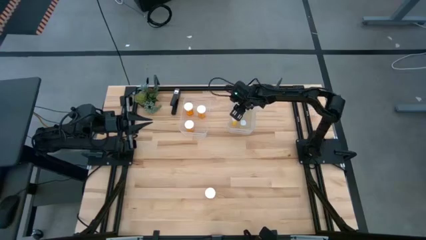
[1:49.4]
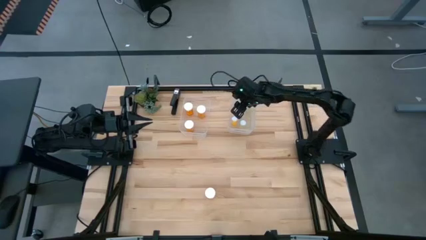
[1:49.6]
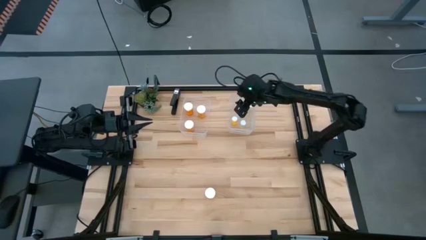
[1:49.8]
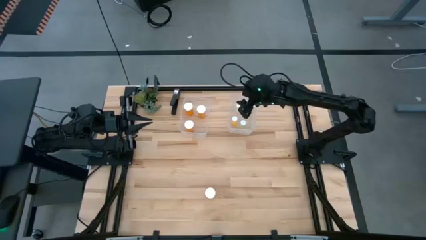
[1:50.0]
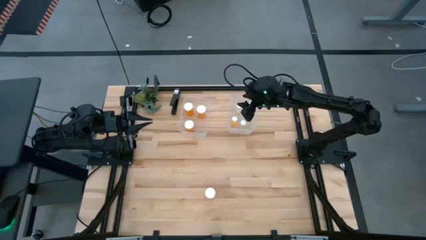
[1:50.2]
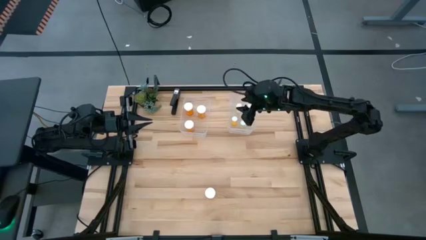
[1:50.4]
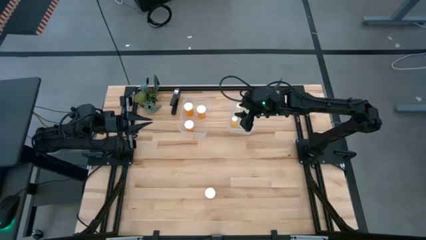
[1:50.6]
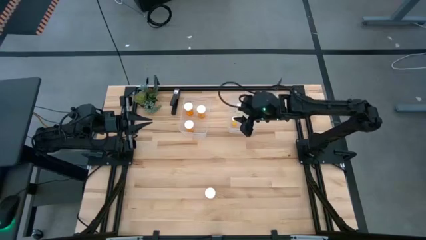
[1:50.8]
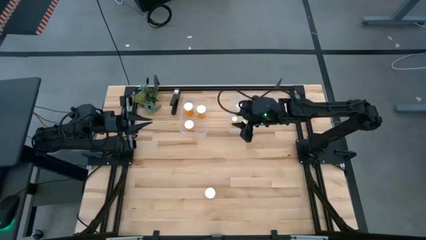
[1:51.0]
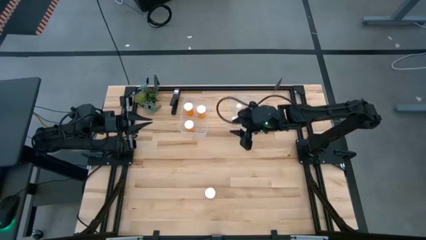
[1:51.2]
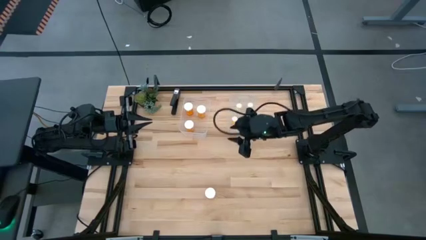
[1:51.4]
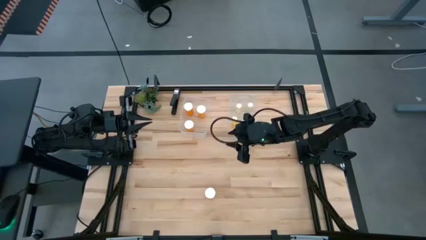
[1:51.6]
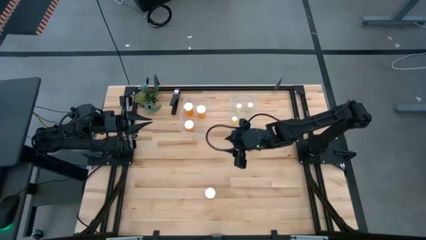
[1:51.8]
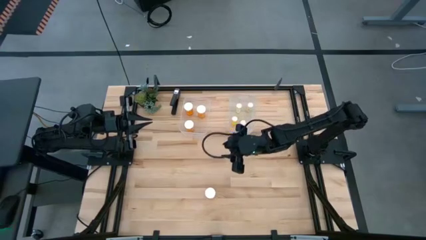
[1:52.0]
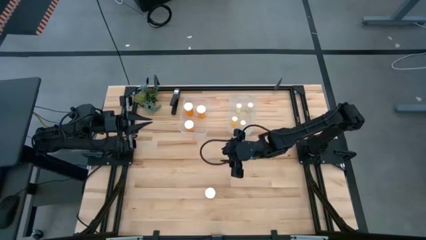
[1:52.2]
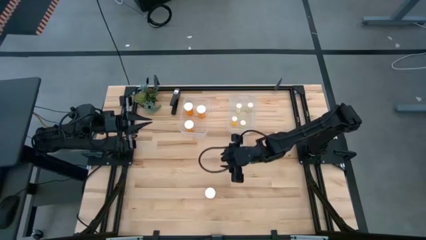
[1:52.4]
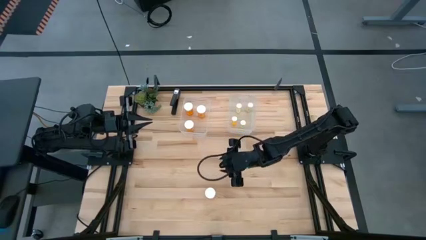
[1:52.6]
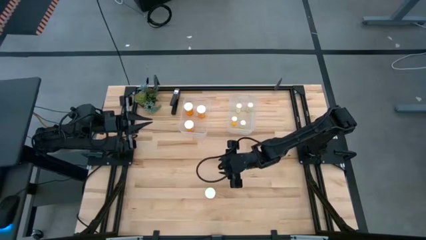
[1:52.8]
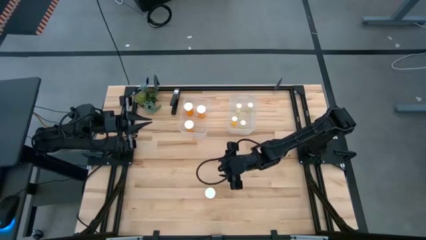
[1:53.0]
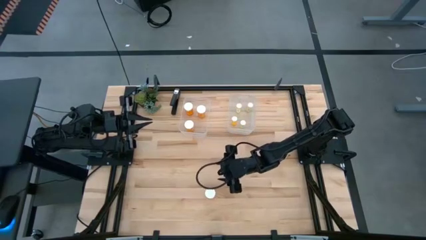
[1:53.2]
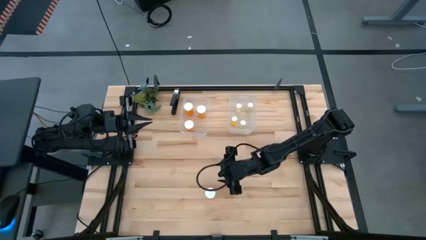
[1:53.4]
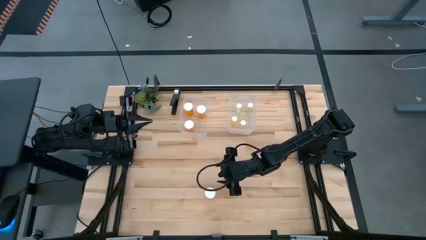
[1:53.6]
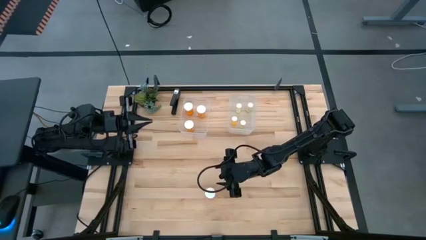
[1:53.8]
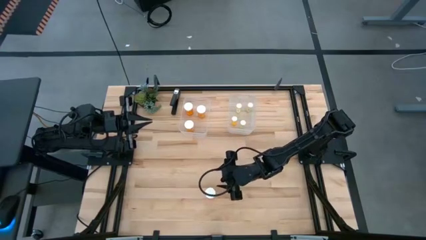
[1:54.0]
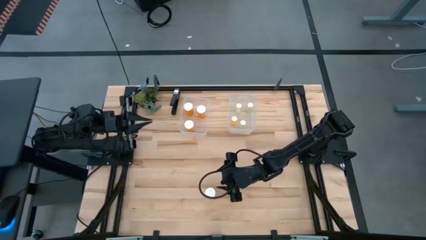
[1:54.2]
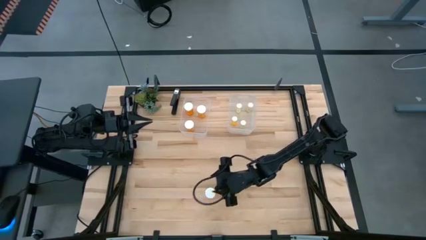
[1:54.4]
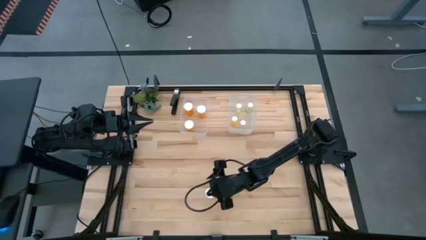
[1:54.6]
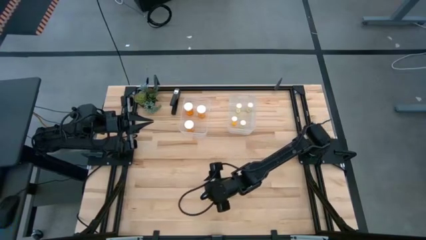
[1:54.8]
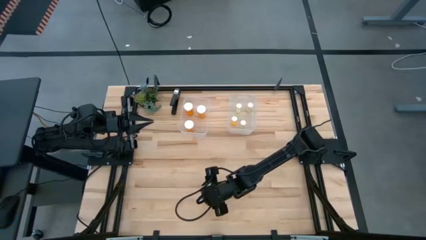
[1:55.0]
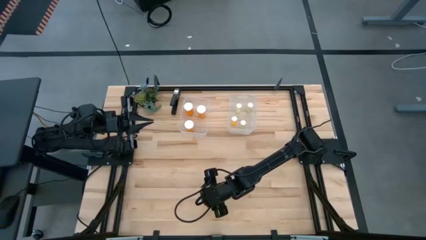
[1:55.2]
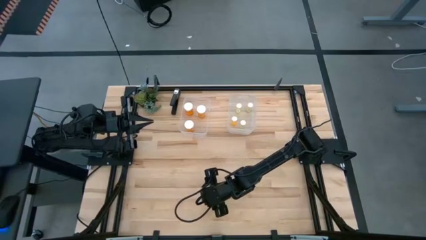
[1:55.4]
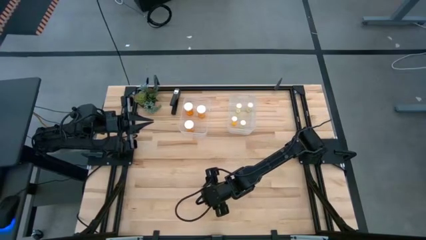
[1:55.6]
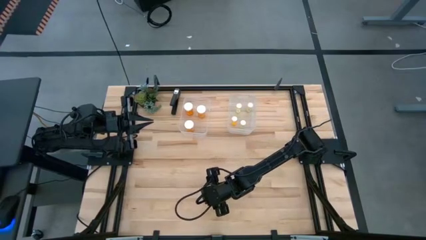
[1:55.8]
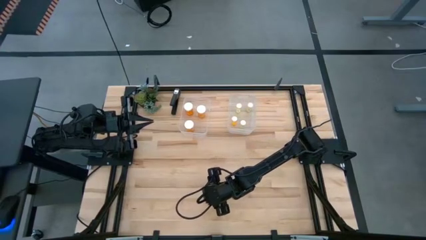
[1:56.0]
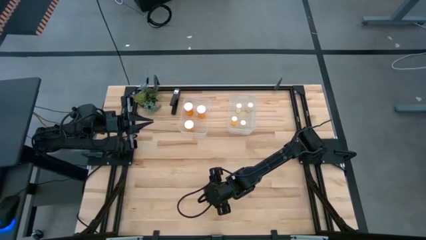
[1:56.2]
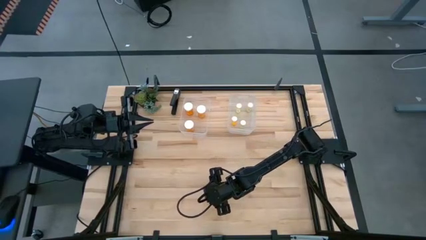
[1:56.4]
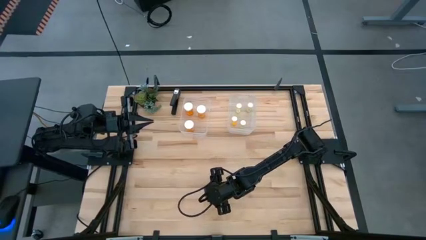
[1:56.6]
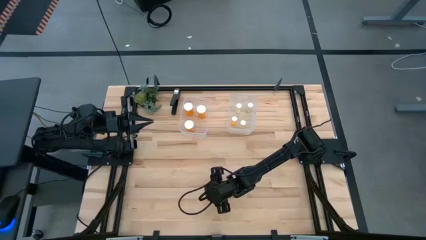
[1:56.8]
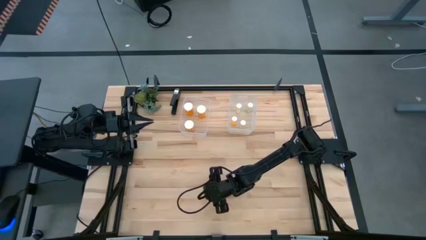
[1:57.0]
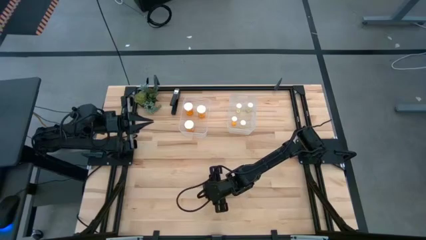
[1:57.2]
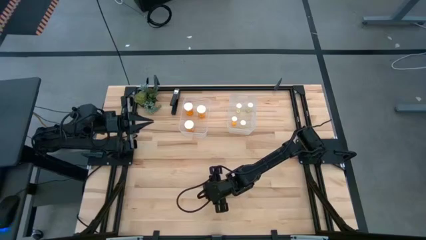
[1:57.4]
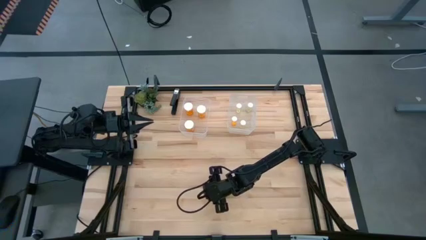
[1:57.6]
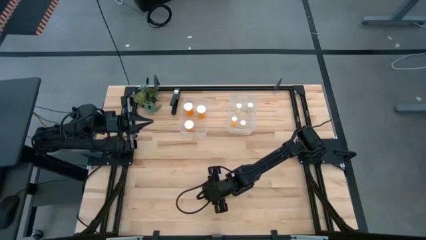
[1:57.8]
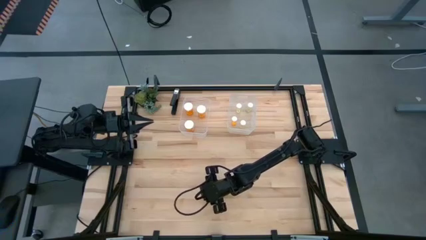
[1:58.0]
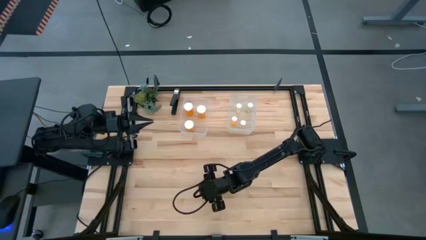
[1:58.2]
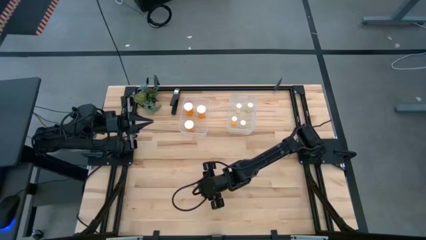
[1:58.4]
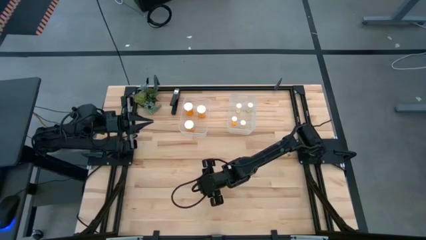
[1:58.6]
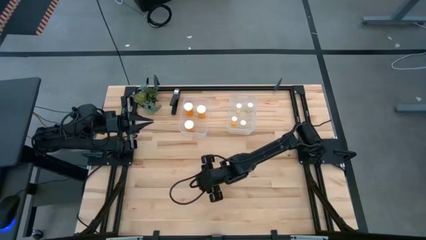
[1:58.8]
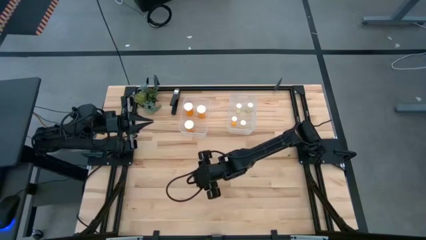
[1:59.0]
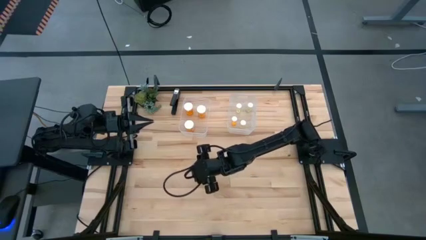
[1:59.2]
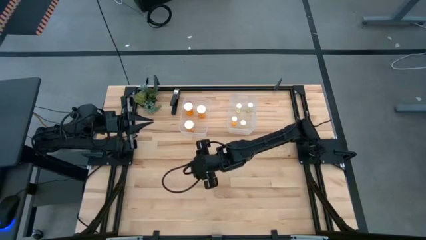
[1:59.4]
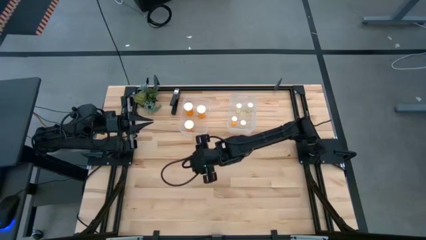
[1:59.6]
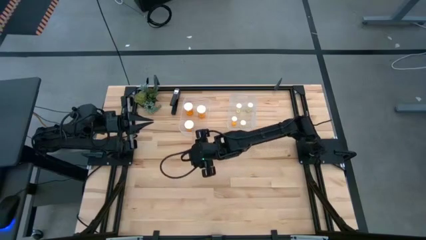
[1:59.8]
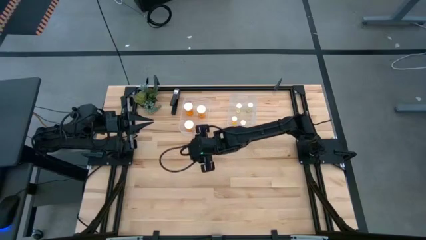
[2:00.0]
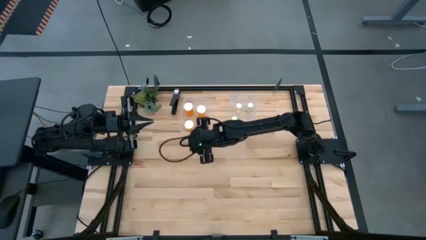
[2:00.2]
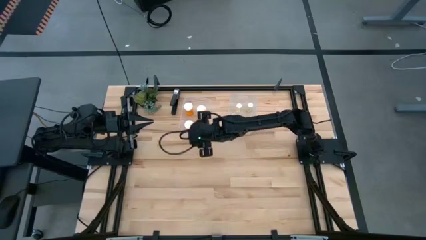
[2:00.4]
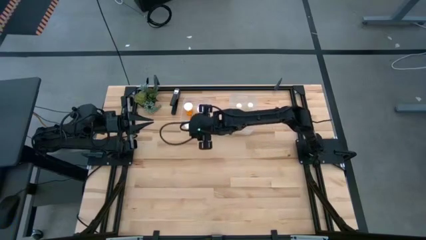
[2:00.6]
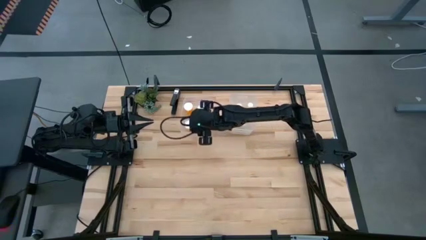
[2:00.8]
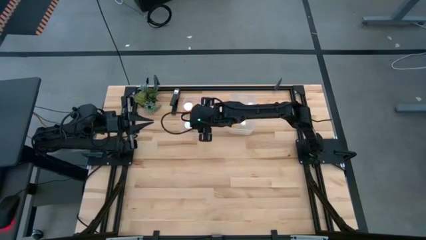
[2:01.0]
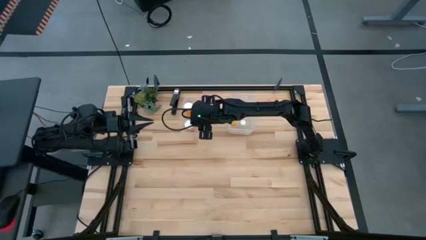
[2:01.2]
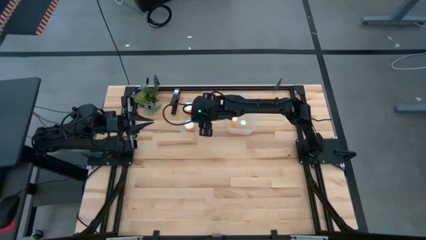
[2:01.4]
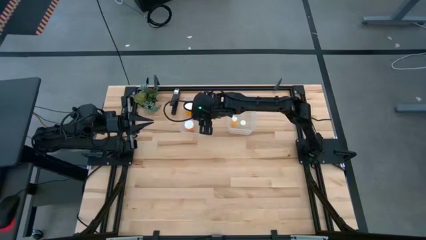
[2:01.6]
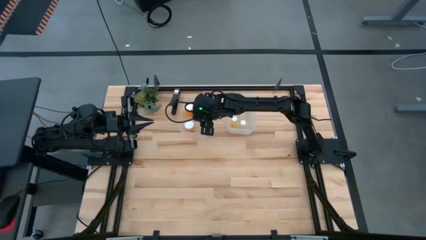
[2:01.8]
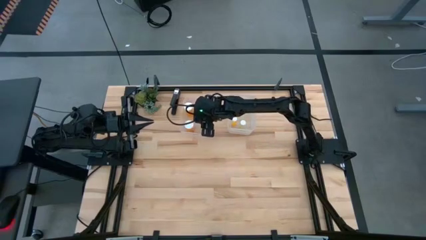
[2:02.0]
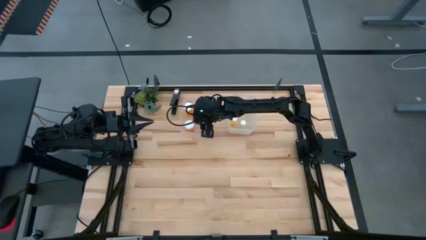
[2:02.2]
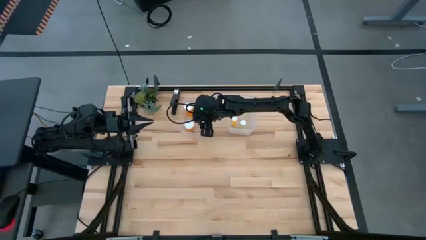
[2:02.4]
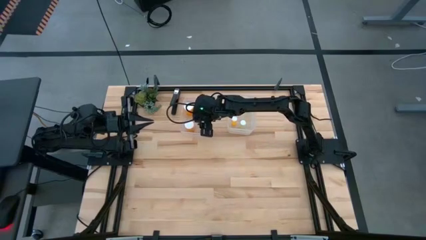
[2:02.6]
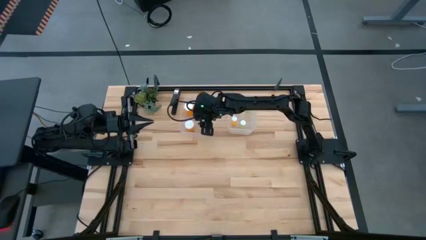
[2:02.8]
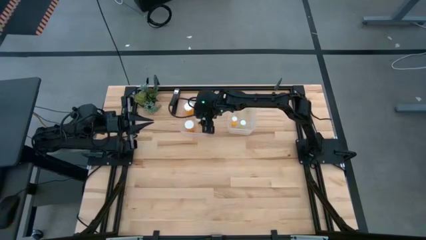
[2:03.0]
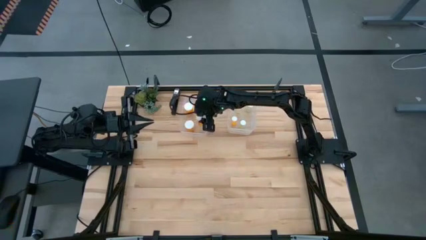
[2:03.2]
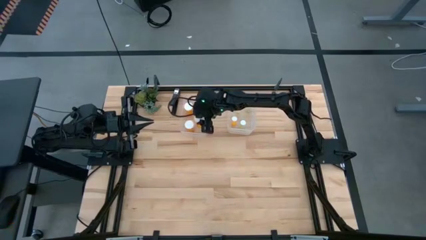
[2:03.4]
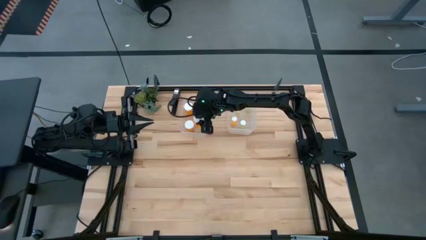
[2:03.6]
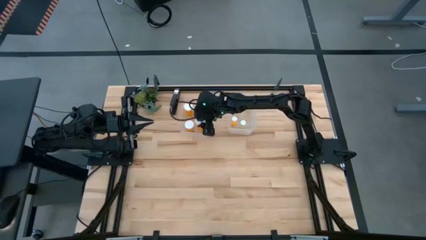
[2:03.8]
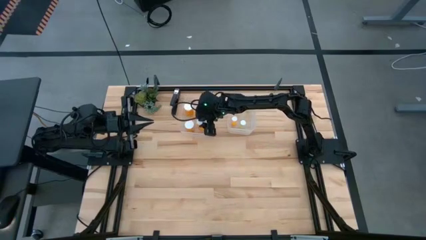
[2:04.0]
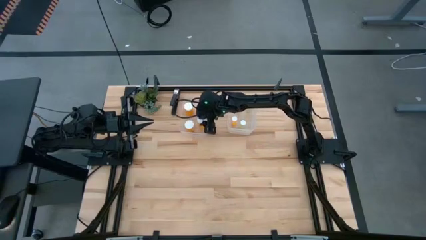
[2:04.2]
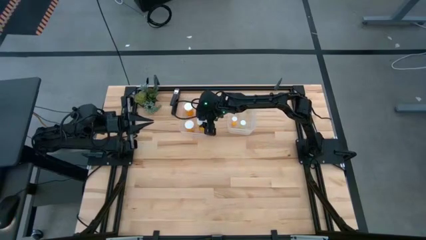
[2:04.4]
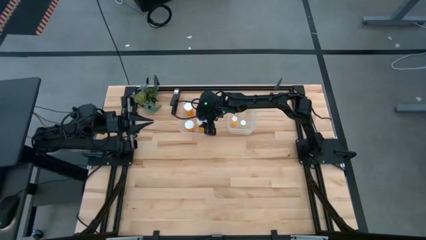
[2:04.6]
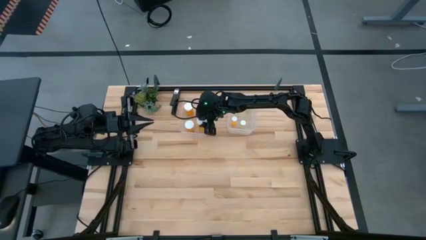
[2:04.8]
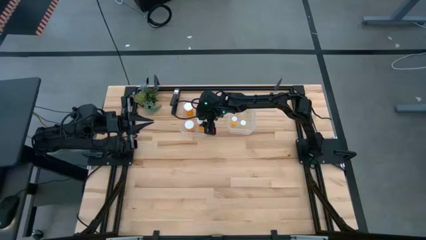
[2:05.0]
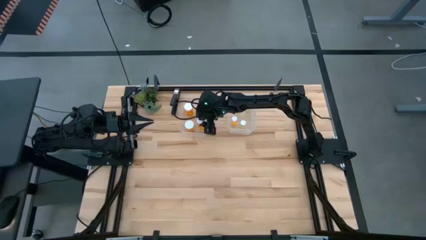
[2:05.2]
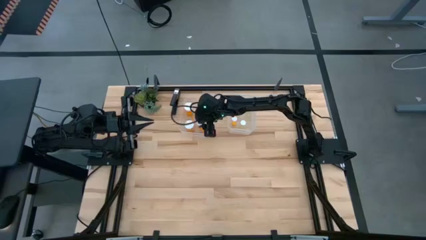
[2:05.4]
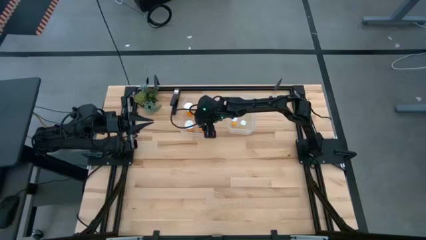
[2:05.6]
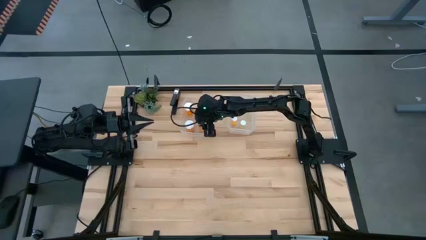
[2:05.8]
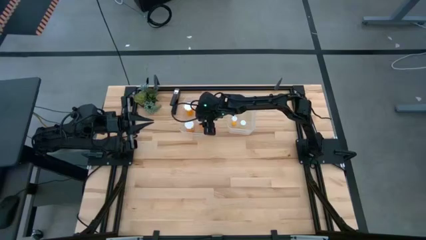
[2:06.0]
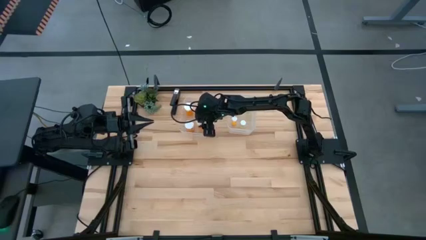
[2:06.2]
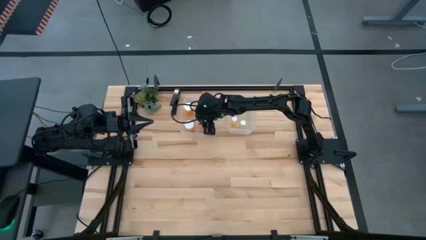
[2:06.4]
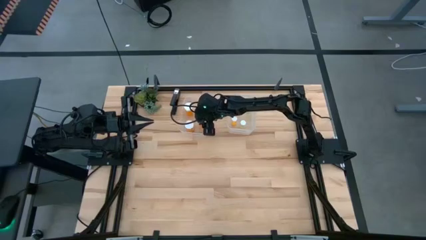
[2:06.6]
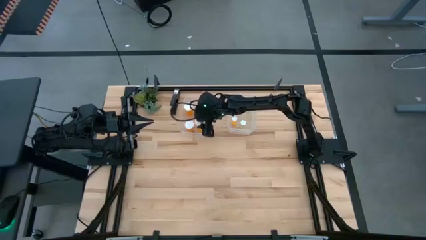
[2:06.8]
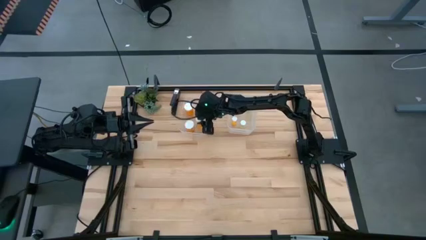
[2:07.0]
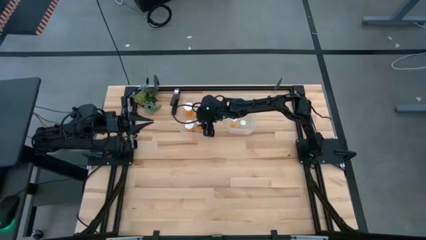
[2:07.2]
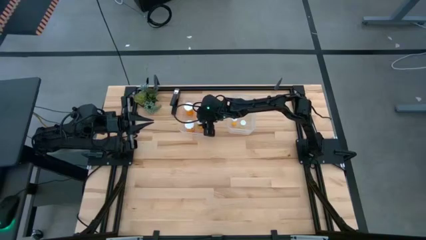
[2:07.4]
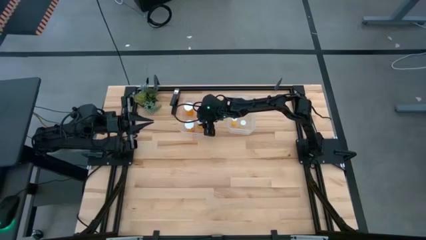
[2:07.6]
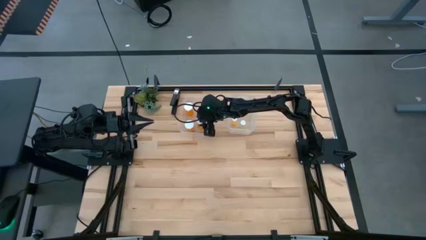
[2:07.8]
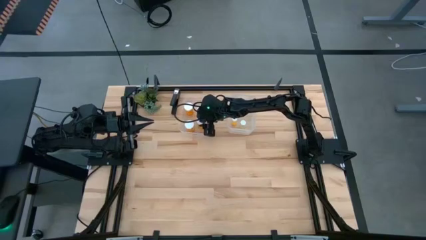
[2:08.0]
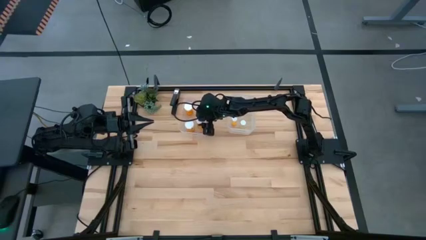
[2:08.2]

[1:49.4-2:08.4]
Task: Pick and place medicine bottles into bin by pill shape (circle, oval)
Put the big orange pill bottle in the left transparent bin
